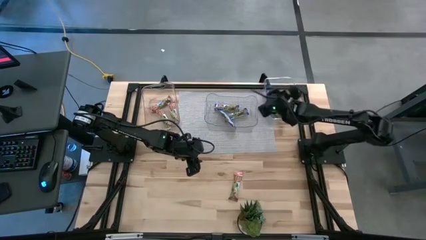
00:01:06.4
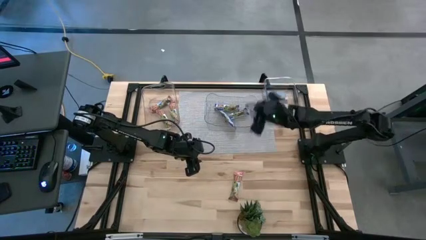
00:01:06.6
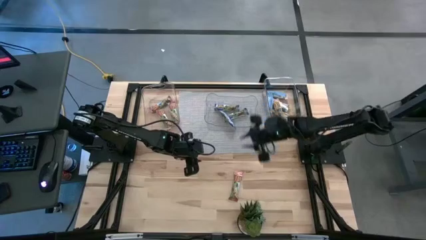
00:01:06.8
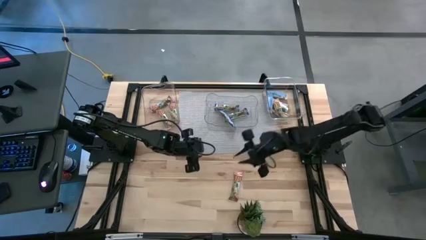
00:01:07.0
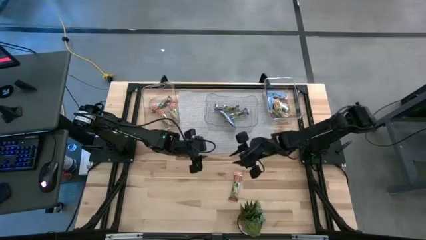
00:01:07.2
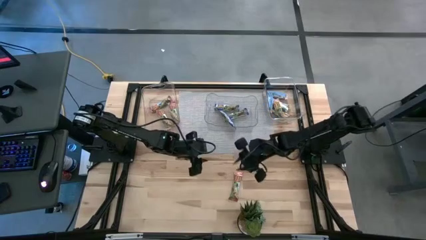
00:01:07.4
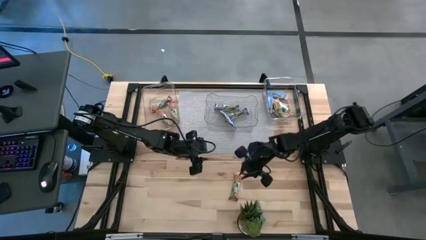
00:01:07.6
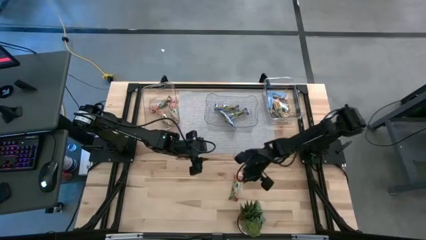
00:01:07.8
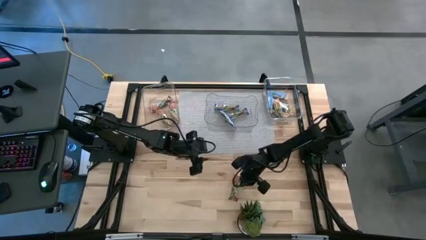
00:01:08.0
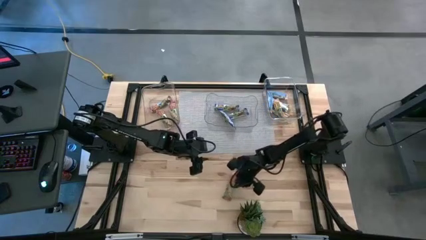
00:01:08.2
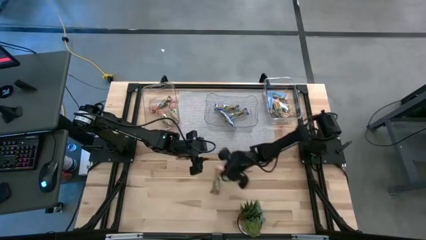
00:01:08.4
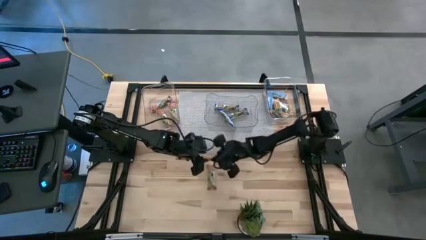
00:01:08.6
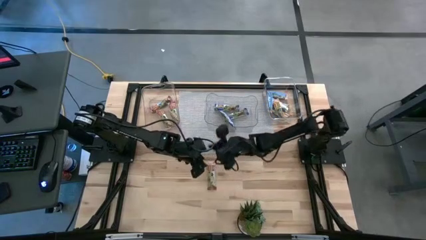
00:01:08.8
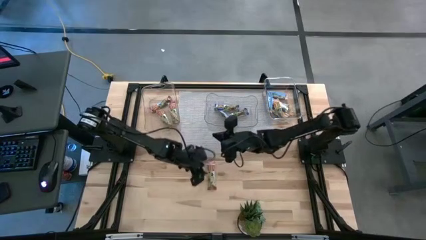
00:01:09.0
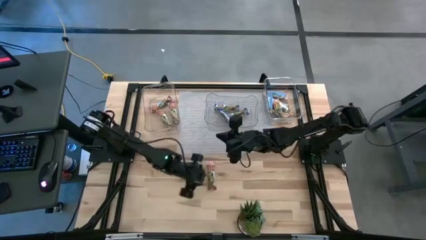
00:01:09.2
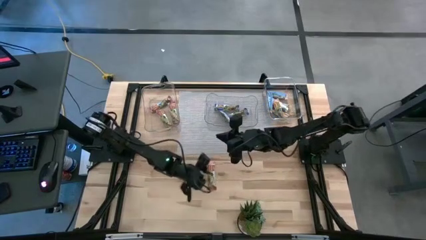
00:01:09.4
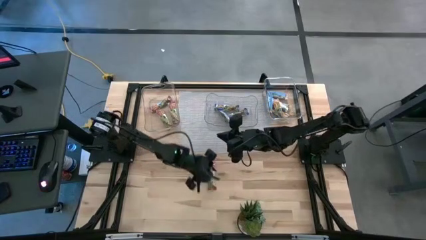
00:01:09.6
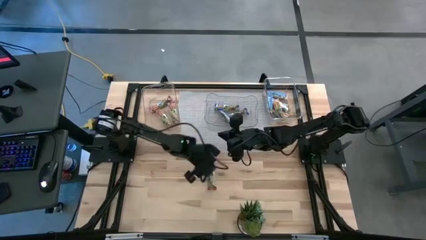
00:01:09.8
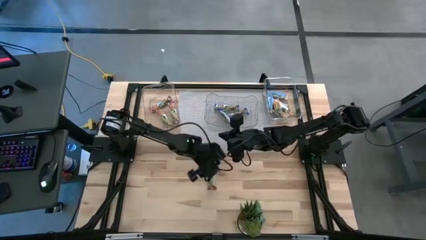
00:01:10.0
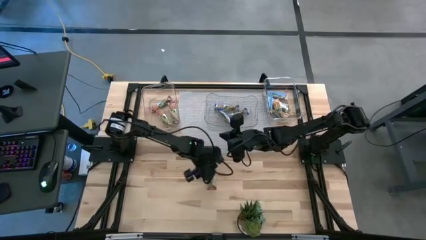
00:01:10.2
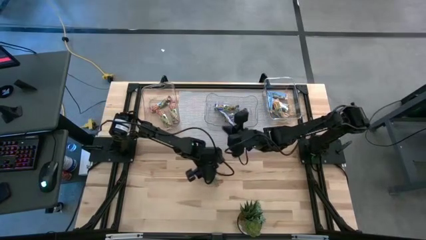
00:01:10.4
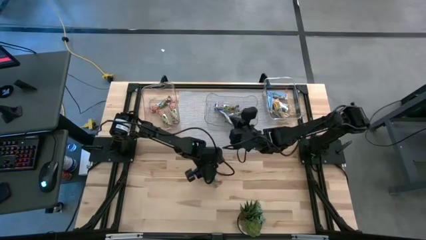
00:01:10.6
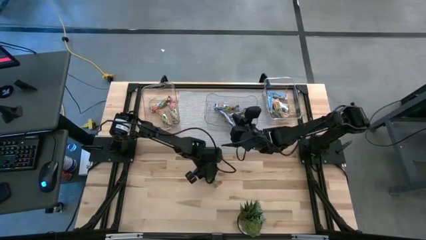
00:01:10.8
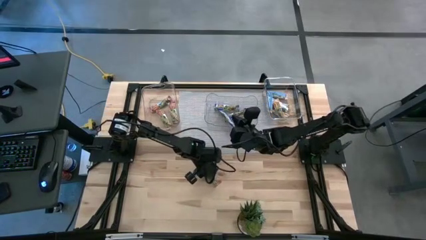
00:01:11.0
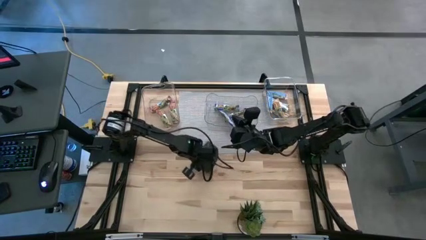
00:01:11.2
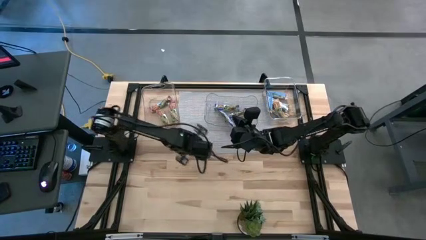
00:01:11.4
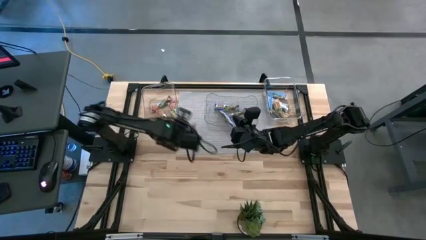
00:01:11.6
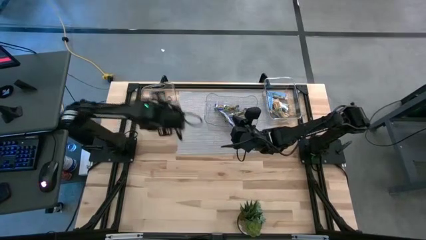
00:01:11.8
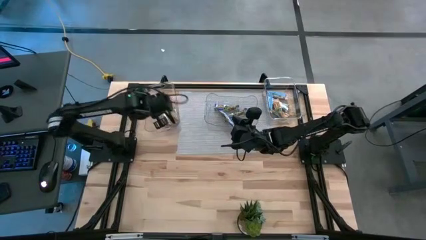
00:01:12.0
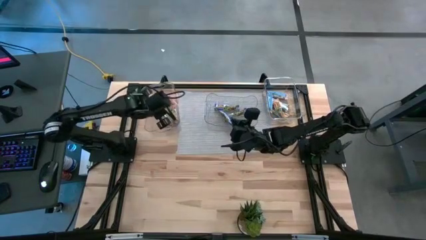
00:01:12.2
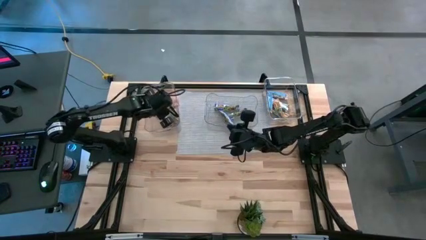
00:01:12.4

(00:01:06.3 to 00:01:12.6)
Task: Pick and place Granola Bars by type
Put the red granola bar into the left transparent bin

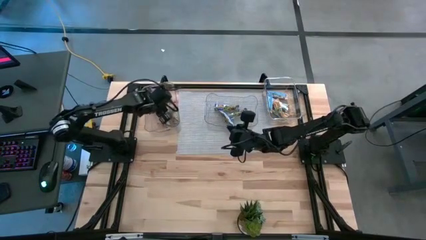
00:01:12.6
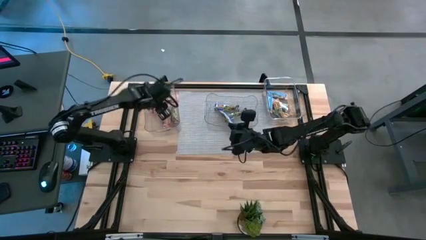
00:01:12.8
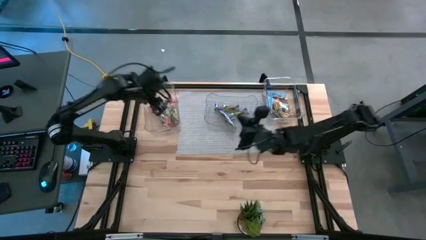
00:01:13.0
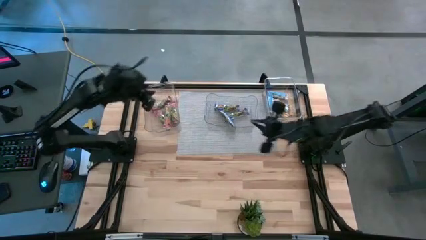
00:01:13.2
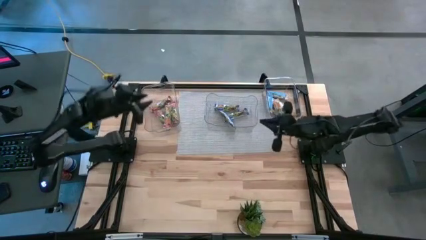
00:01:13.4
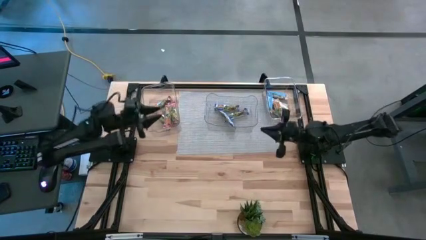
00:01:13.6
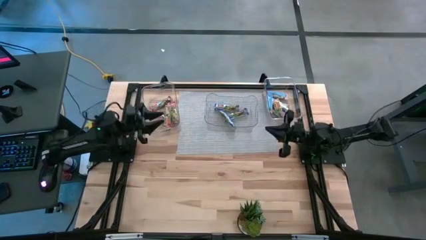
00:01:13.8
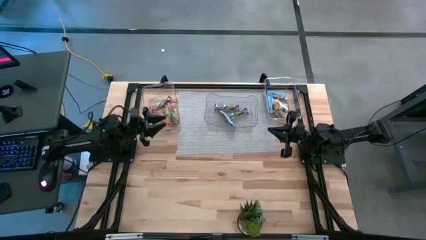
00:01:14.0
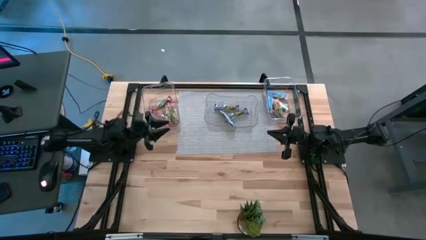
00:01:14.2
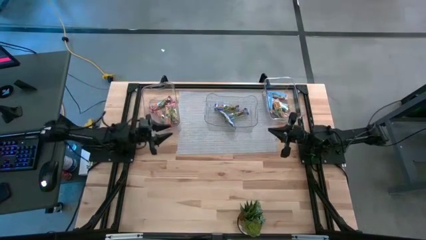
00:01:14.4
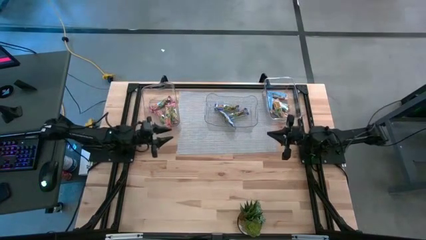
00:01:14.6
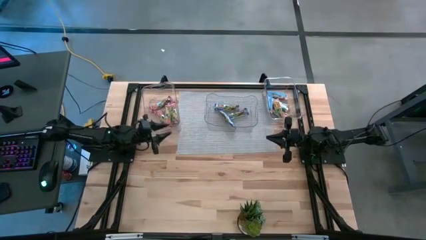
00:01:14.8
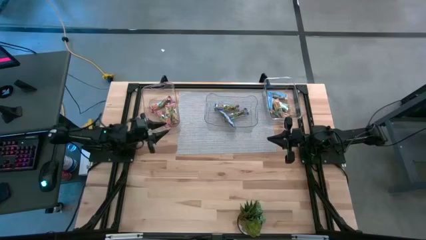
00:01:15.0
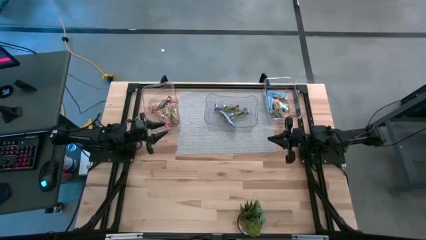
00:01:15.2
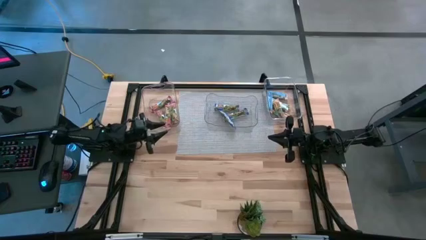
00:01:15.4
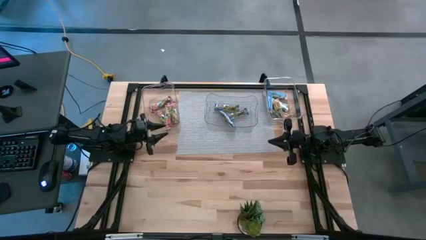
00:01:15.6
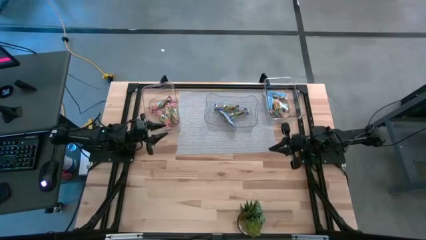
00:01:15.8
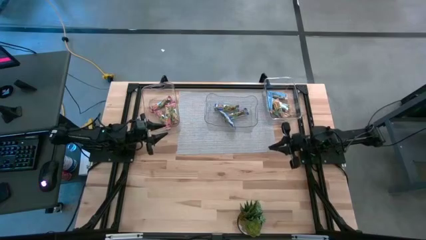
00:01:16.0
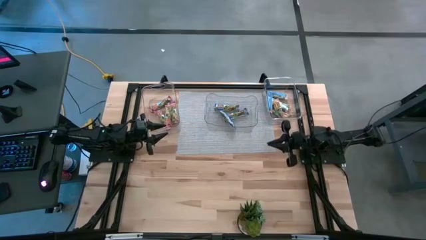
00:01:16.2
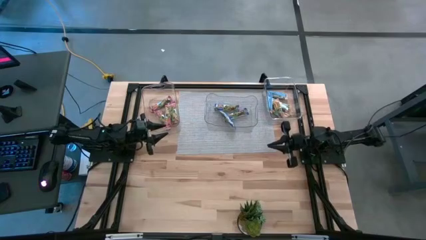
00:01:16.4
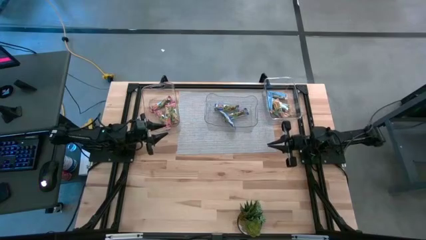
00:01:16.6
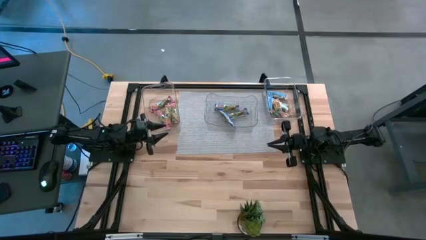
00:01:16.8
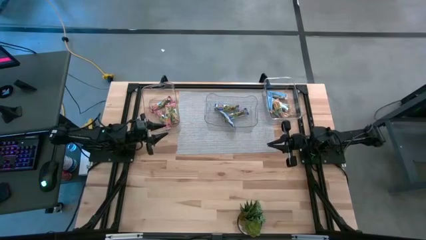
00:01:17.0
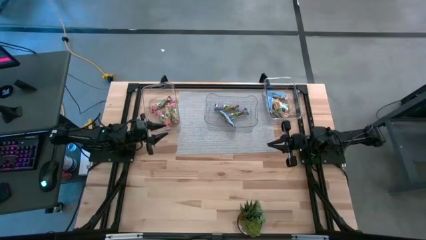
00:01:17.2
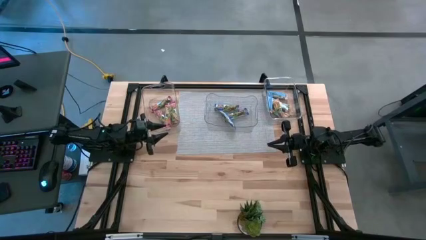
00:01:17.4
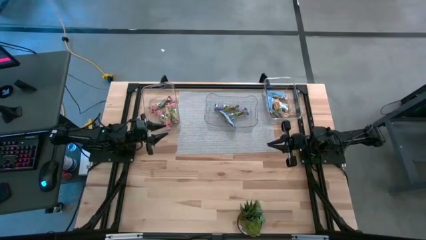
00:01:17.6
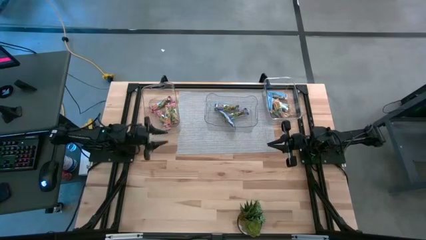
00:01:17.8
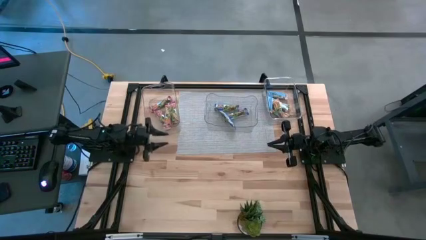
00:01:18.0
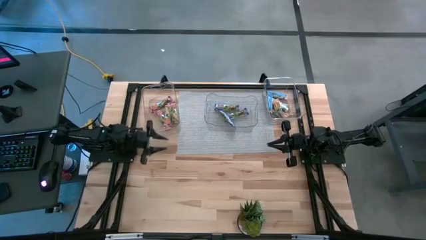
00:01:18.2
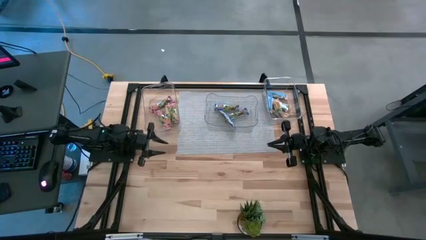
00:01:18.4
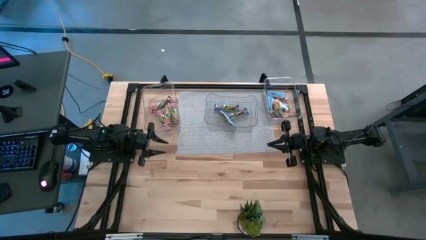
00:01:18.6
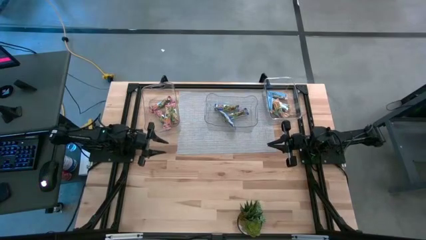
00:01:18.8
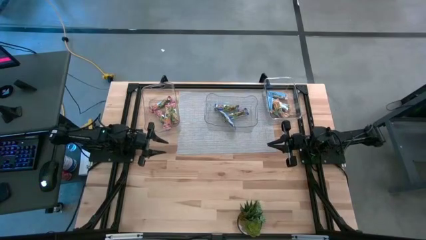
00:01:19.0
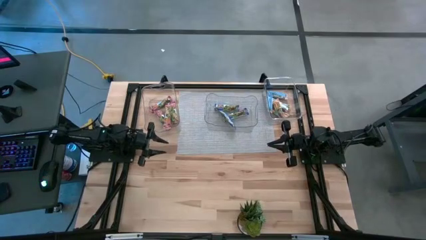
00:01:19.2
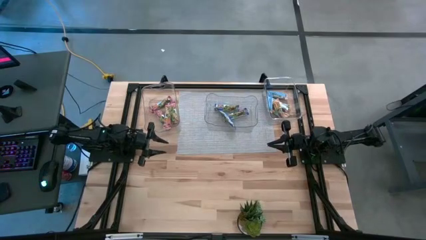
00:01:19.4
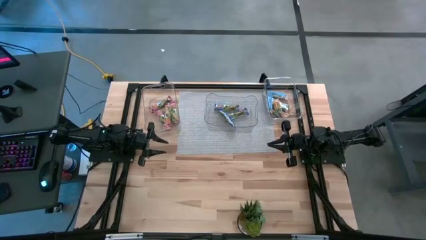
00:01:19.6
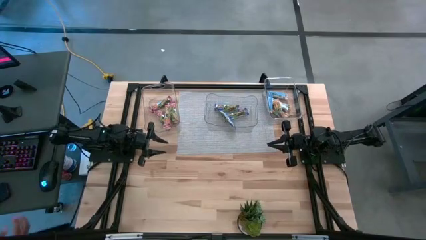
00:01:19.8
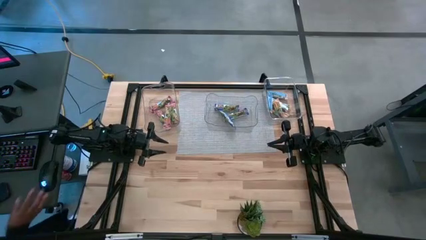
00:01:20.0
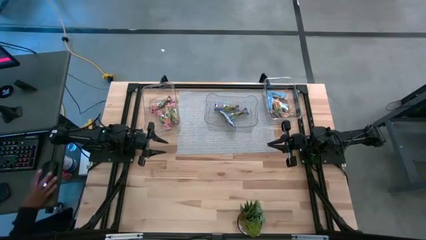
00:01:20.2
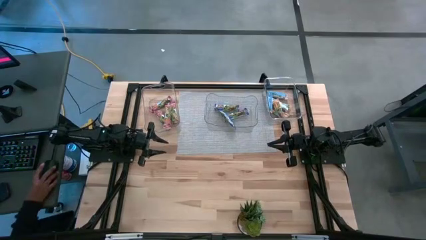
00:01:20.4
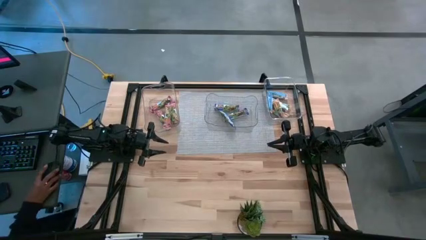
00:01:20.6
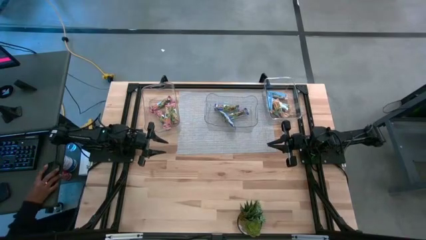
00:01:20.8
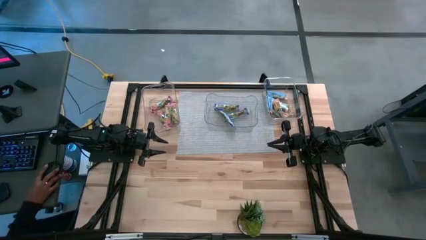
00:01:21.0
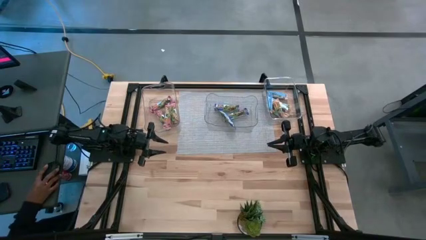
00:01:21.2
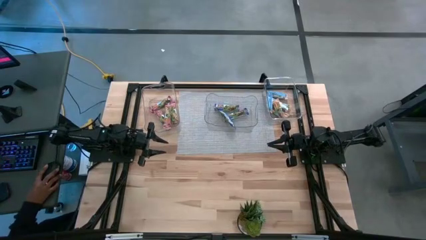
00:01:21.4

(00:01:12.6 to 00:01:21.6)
Return to Home Position

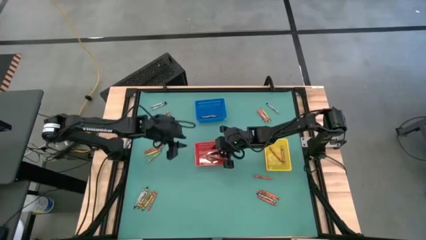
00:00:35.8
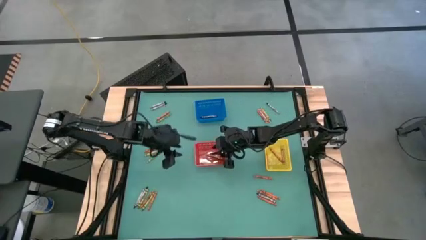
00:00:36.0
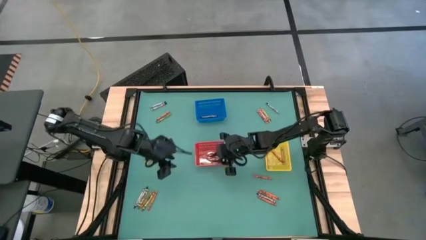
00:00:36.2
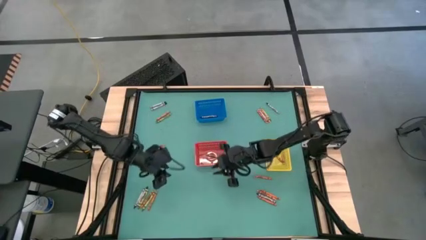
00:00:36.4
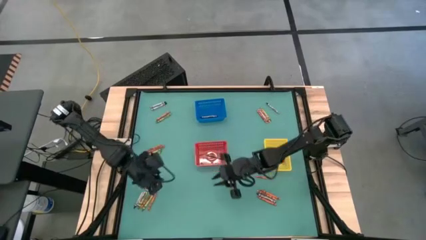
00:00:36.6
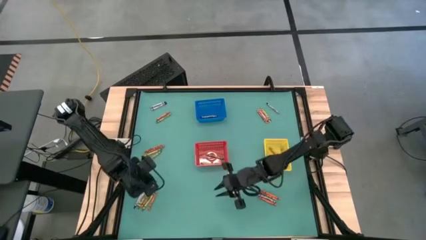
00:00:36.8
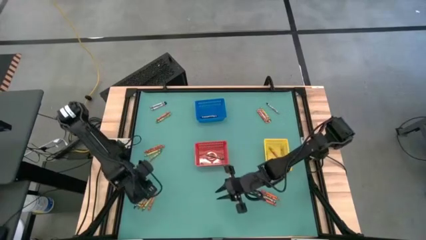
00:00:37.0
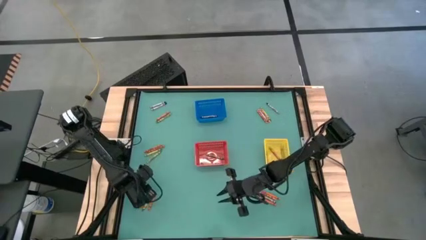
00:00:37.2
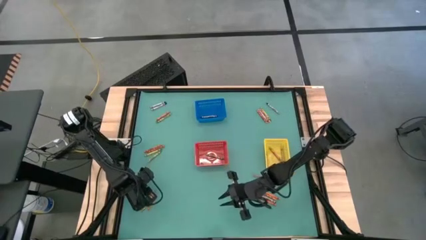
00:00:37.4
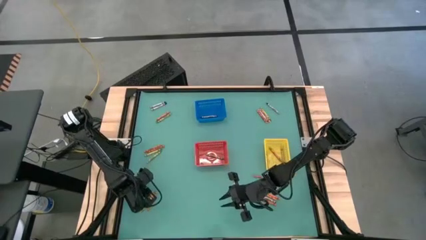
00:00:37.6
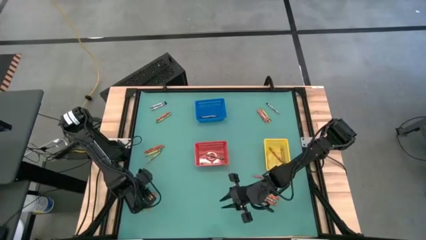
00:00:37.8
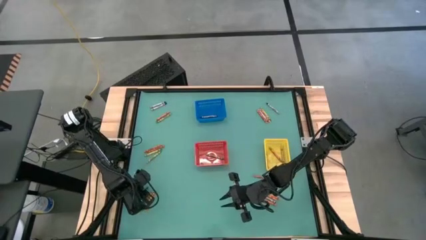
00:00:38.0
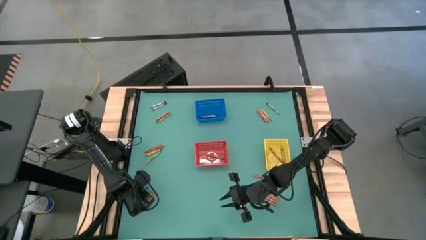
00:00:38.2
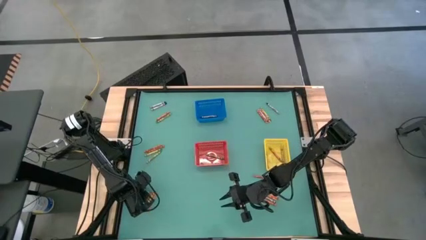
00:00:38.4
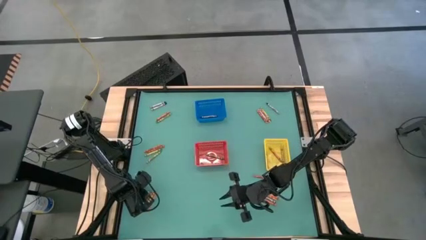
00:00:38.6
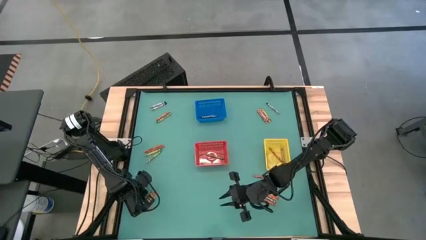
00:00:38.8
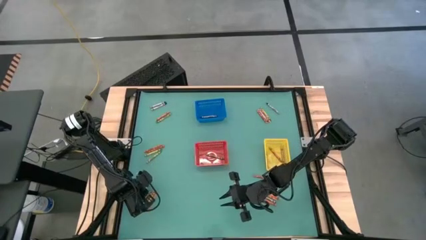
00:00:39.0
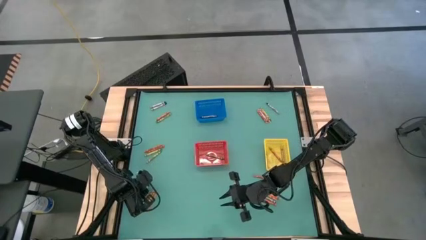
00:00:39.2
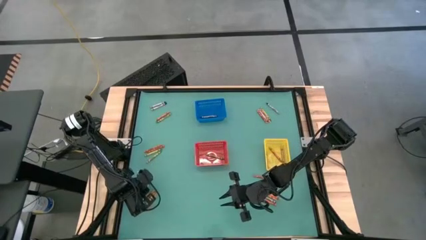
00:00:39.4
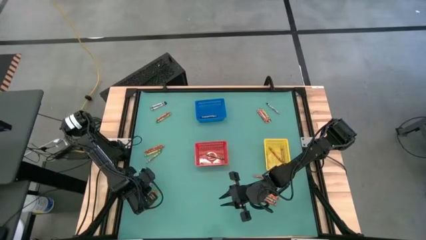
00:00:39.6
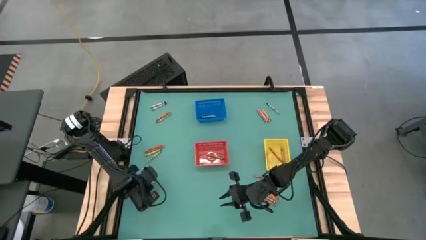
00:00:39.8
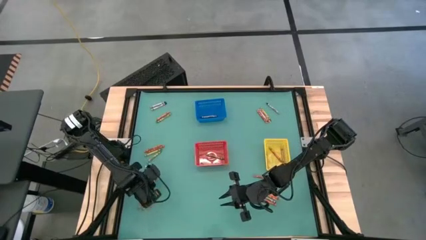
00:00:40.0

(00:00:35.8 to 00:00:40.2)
Task: Sort crayons
Put the black crayon into the blue bin
